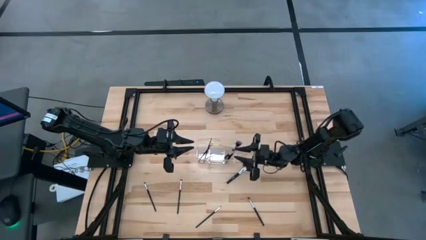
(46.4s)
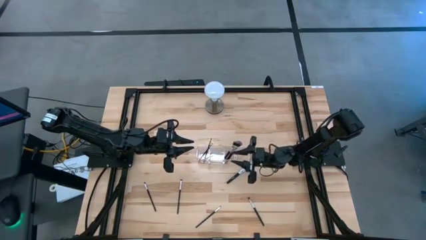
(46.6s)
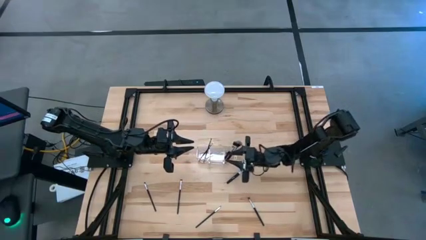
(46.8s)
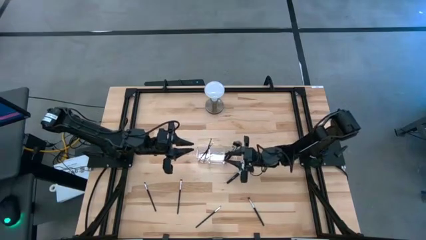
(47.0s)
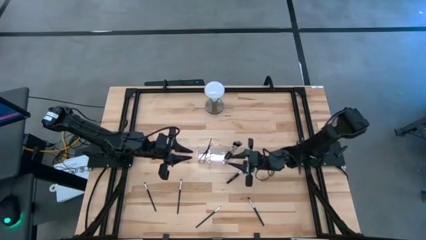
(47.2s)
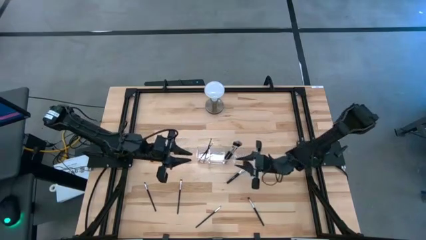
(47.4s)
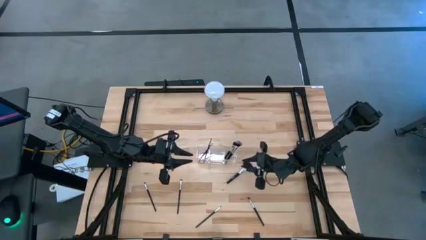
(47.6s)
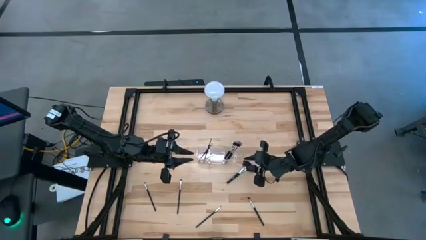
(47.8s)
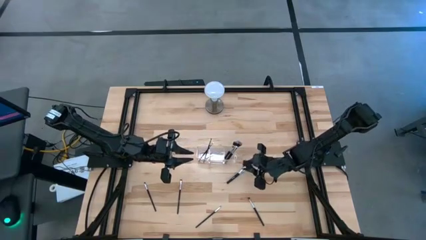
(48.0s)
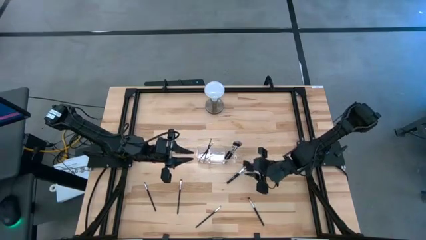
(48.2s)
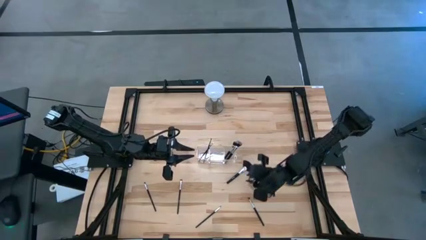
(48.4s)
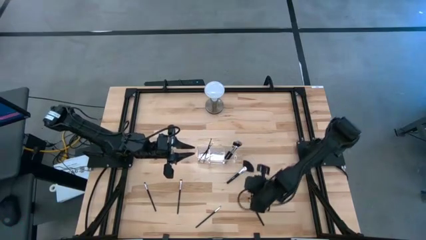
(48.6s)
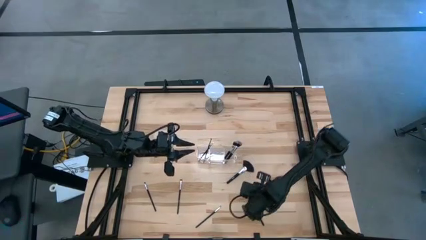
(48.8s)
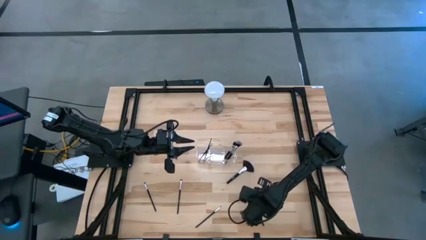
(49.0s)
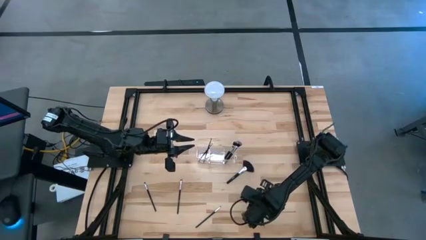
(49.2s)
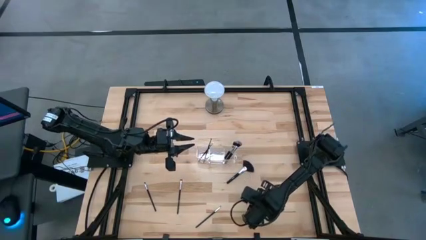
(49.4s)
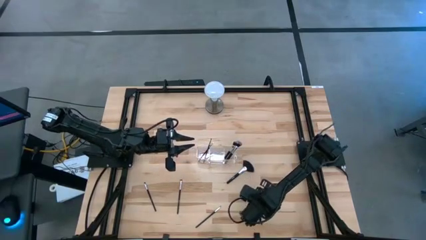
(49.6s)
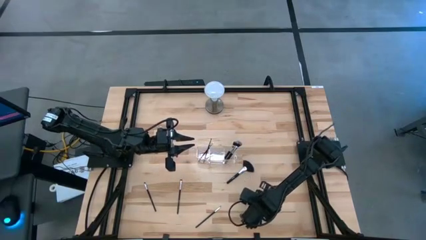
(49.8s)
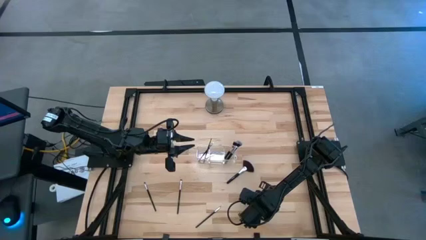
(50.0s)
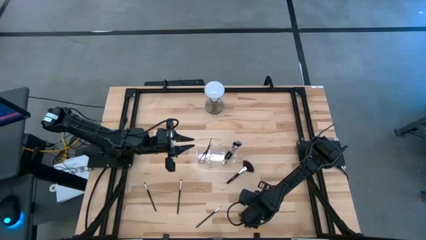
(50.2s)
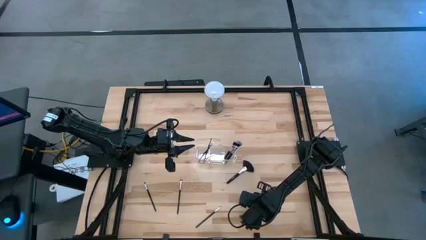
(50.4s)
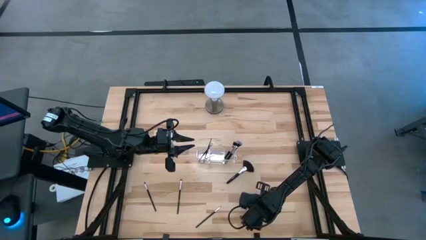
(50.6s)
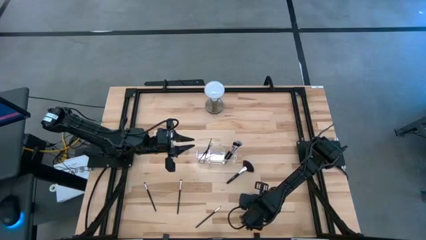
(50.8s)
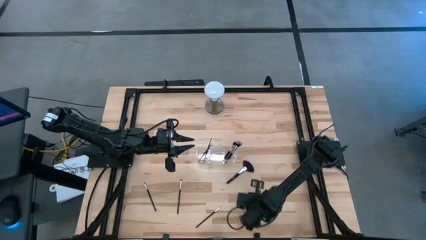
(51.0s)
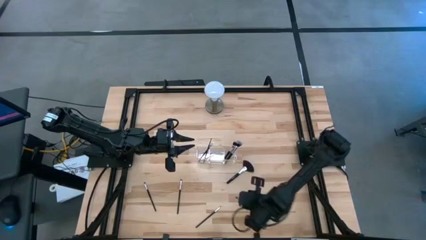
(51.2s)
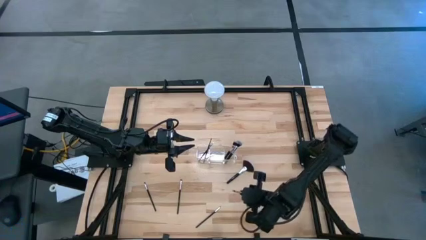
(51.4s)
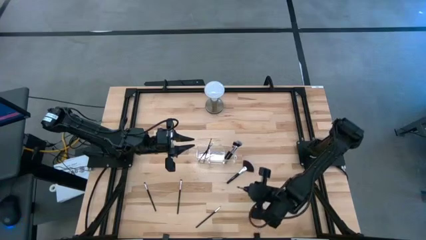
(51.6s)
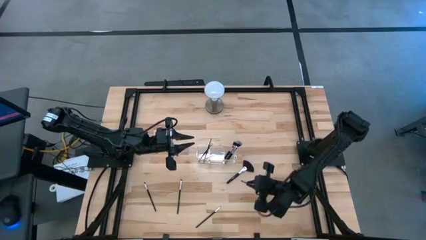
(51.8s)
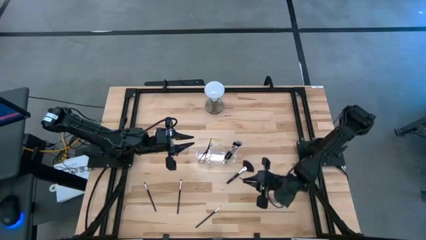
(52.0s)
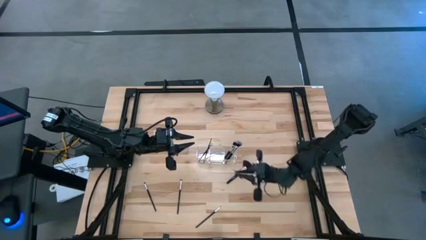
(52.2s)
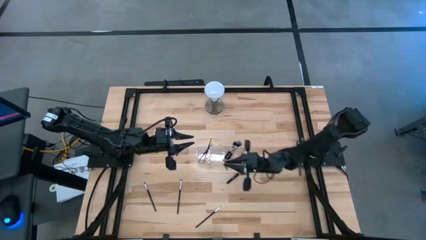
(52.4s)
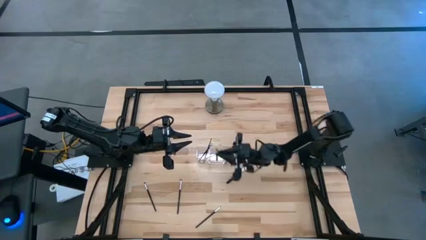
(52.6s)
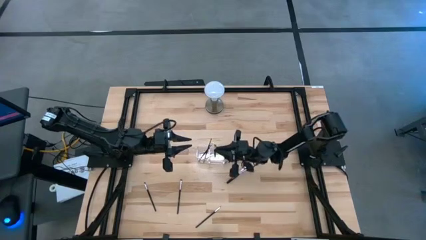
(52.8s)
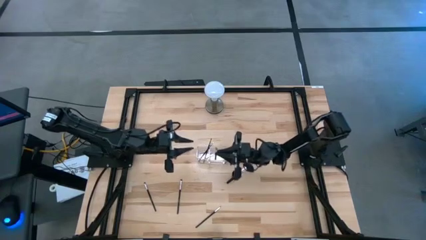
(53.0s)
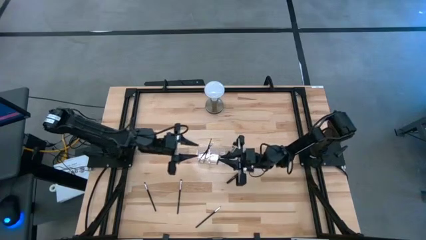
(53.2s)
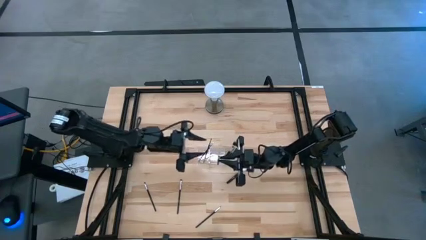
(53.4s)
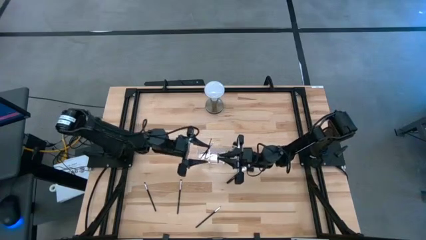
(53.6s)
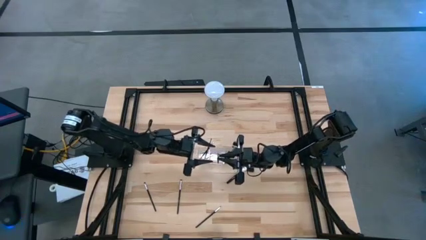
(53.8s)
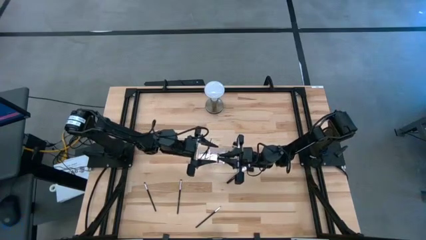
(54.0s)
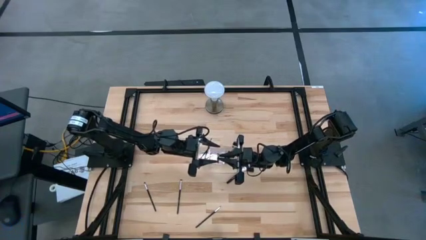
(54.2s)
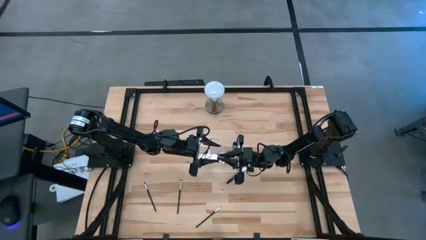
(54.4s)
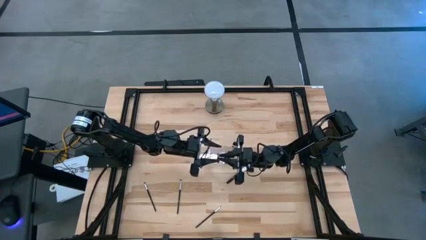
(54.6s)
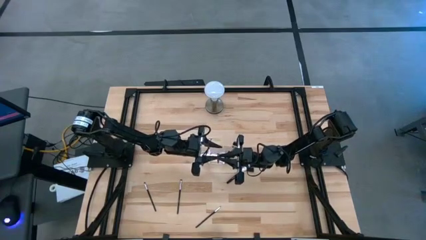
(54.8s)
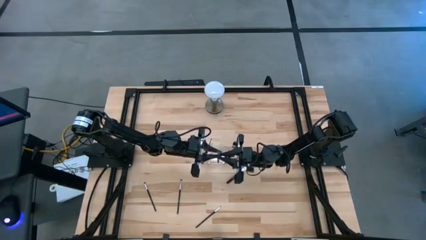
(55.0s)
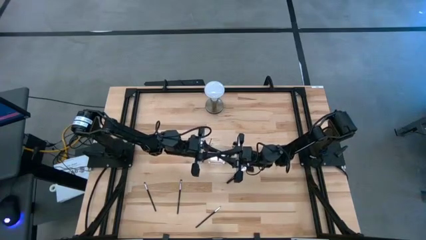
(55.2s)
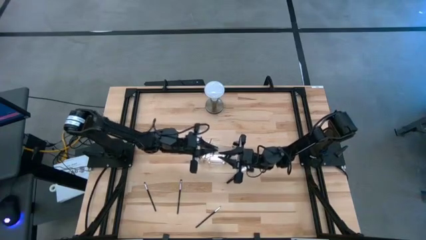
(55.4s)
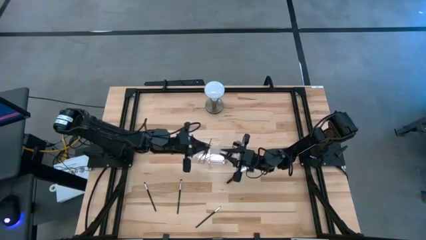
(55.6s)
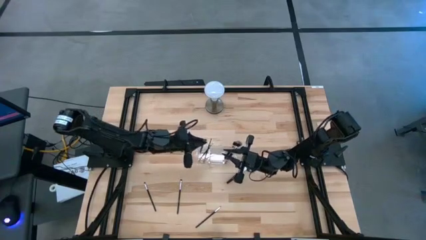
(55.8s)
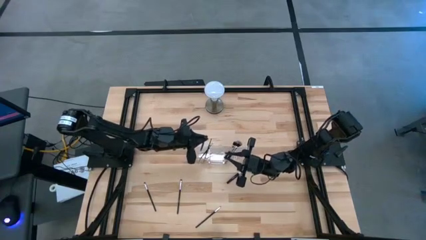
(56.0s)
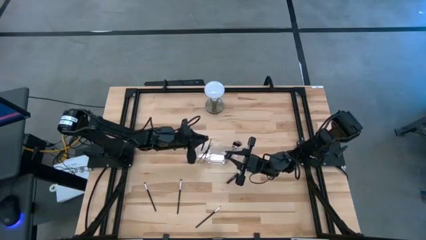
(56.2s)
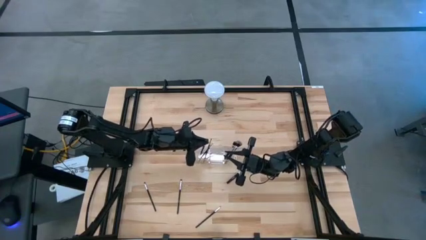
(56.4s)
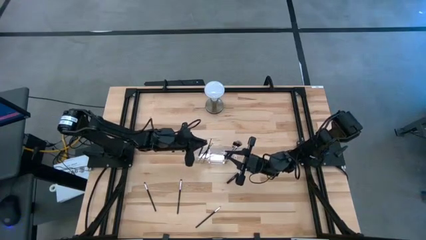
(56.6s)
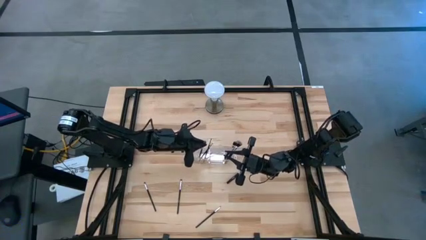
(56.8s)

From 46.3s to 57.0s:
Task: Put items in baskets/containers
Put the black eyeshadow brush into the transparent organizer

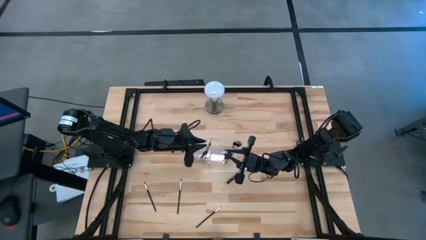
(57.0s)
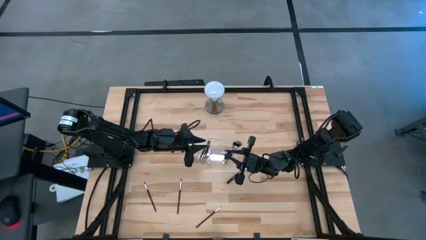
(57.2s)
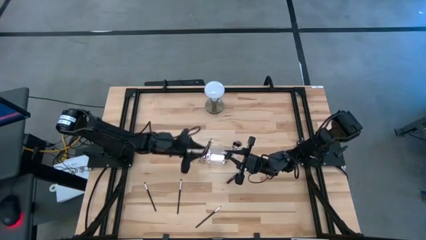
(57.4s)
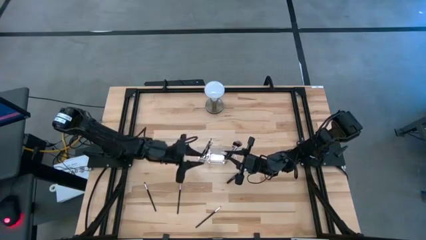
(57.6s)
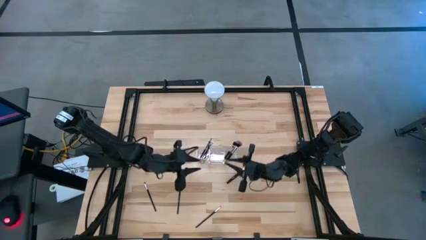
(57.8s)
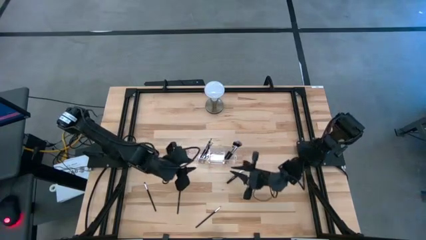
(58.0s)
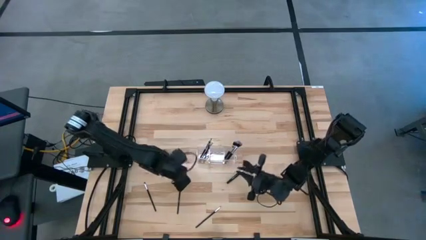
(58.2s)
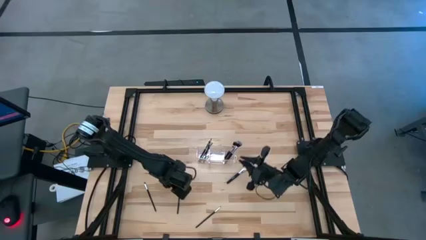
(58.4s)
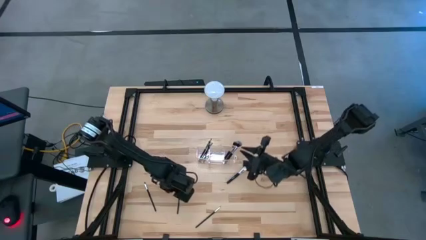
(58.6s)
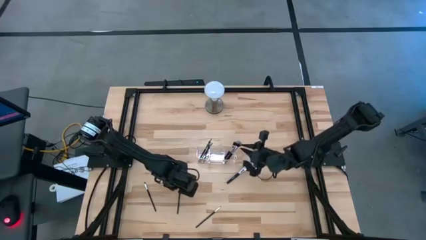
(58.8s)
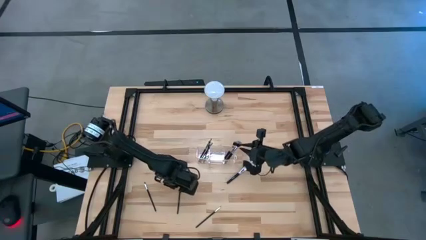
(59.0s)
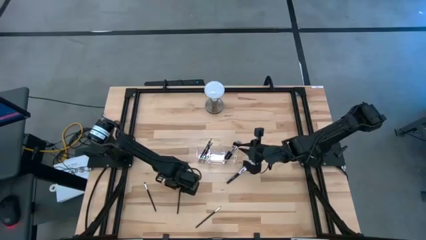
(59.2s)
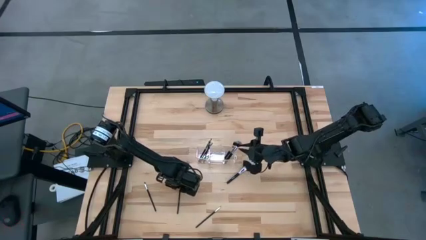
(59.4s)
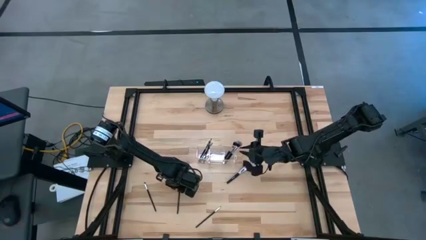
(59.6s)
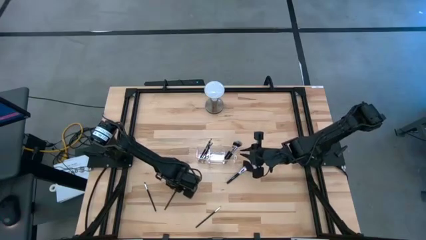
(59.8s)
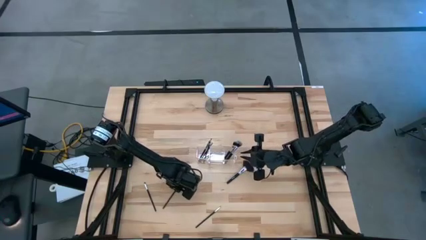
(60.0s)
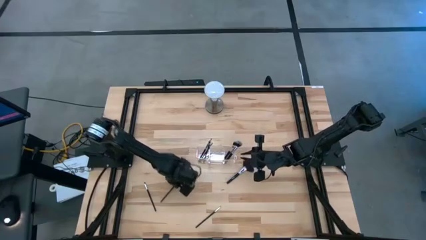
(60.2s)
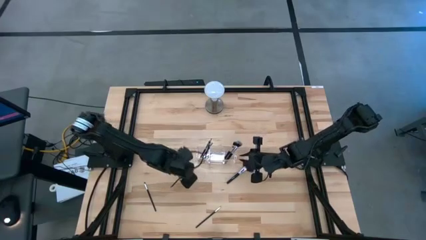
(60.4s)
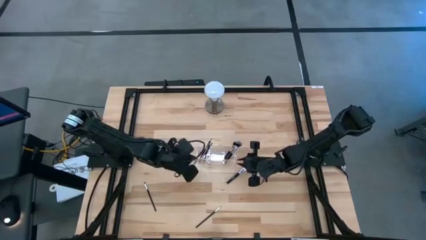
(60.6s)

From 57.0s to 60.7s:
Put the black eyeshadow brush into the transparent organizer

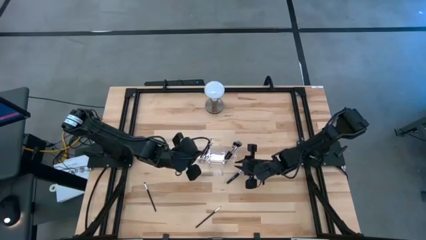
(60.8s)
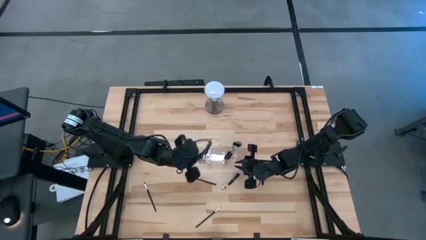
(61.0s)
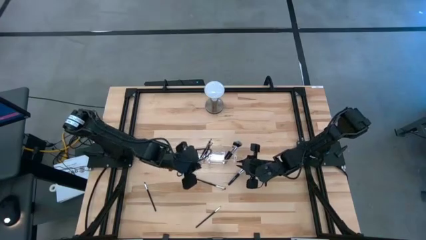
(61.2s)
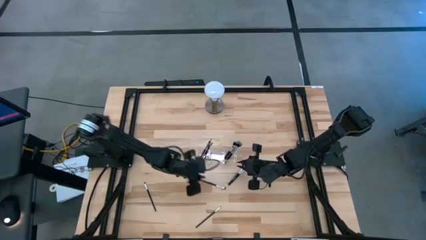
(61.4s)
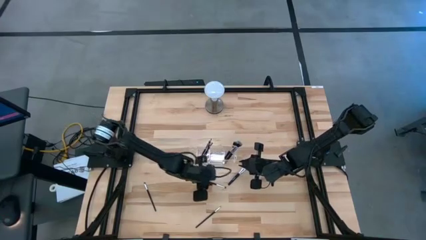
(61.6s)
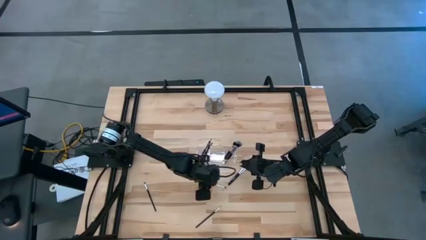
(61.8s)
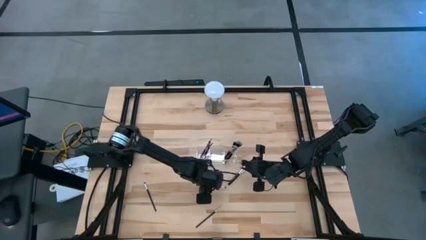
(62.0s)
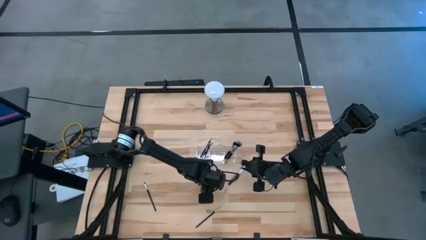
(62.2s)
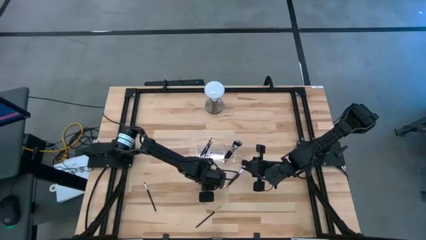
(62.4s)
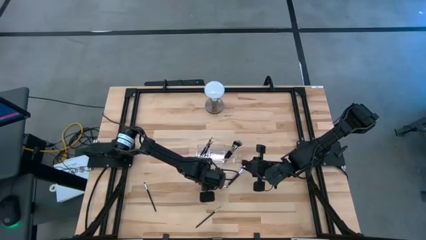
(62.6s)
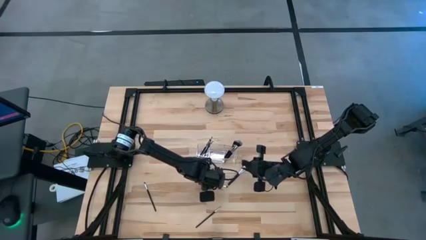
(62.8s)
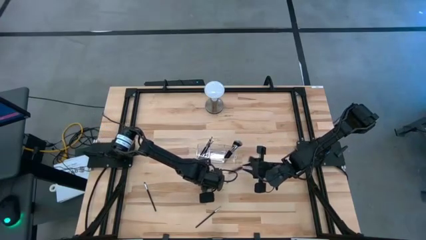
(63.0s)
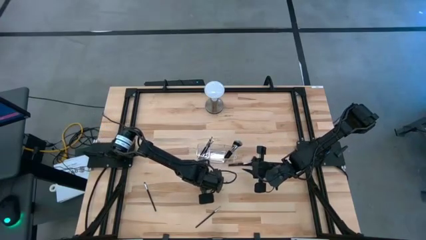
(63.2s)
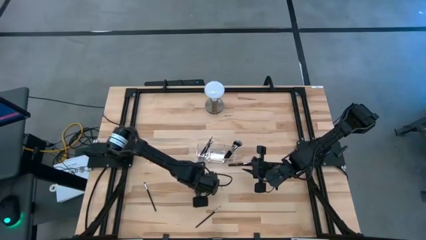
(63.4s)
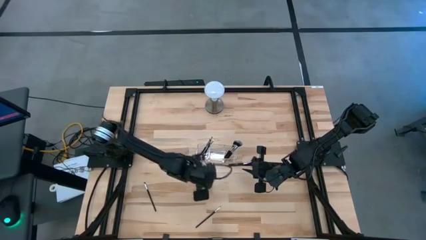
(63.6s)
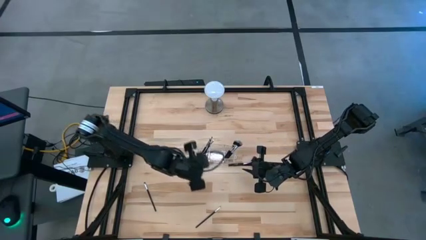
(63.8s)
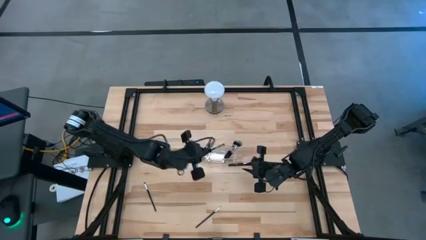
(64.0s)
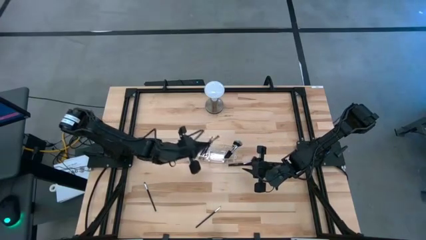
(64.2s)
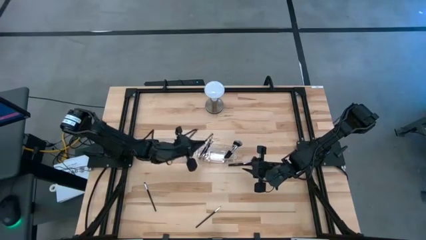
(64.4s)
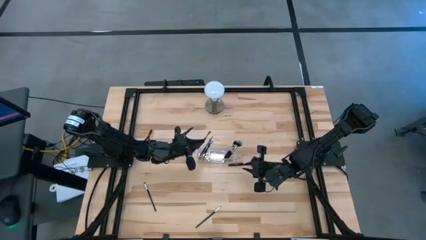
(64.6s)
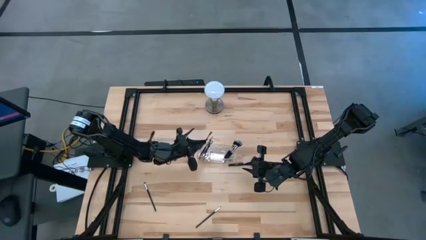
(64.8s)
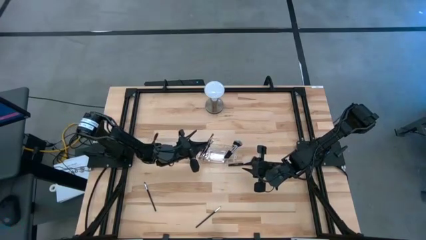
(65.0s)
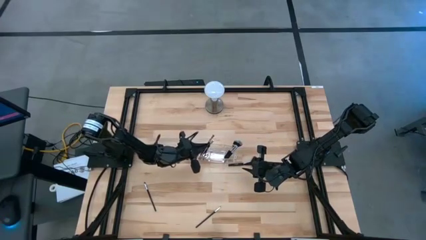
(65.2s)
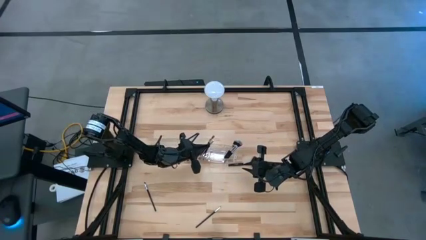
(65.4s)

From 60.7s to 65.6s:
Put the black eyeshadow brush into the transparent organizer
